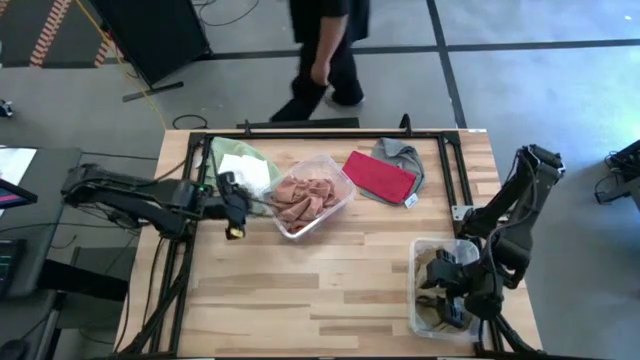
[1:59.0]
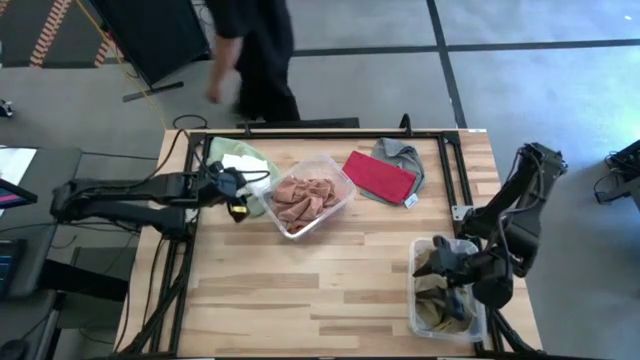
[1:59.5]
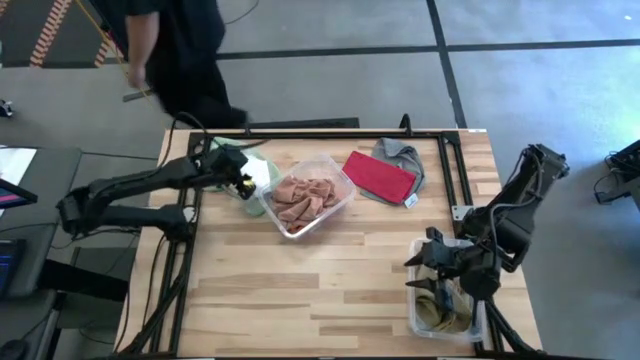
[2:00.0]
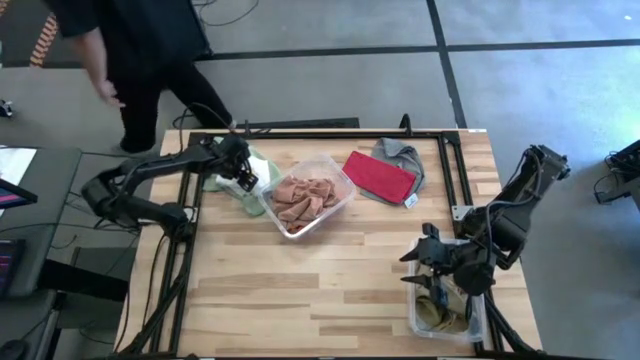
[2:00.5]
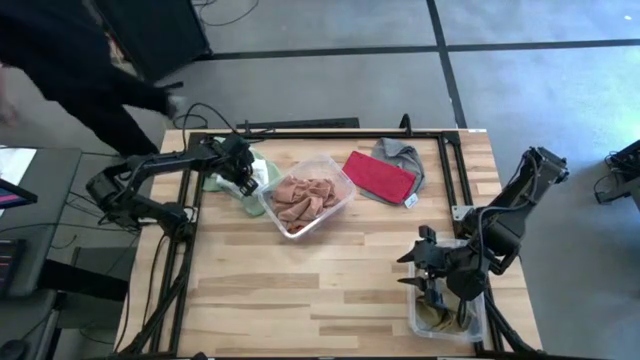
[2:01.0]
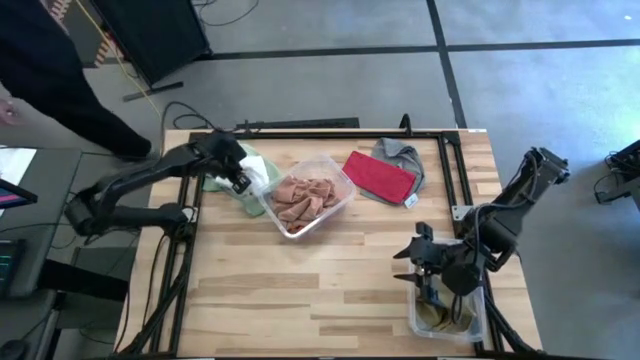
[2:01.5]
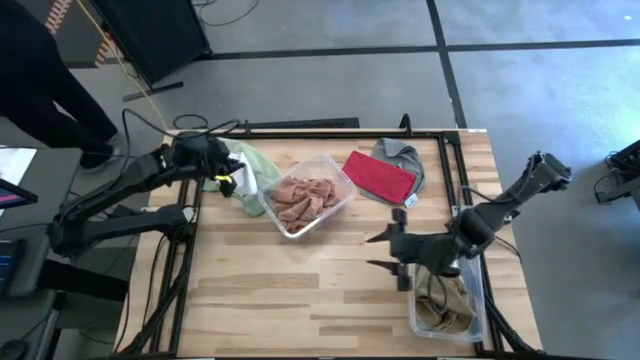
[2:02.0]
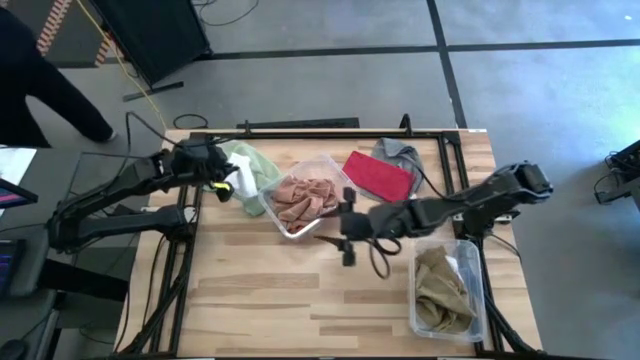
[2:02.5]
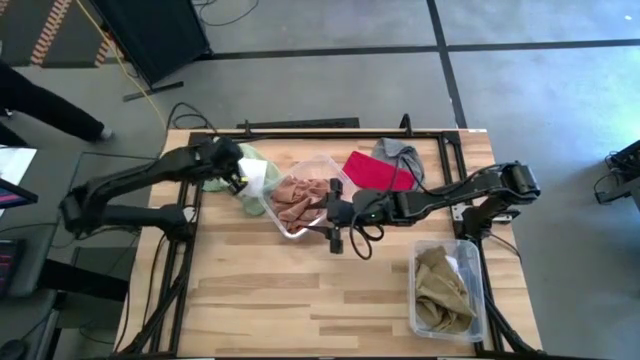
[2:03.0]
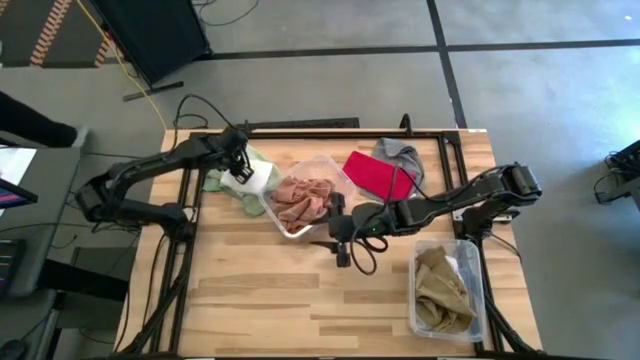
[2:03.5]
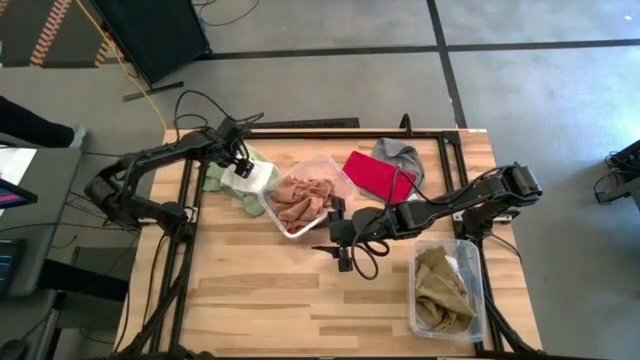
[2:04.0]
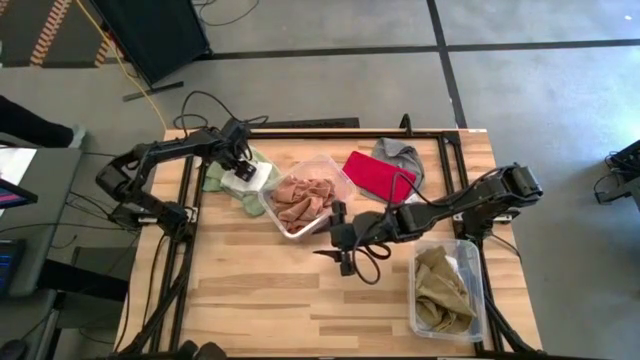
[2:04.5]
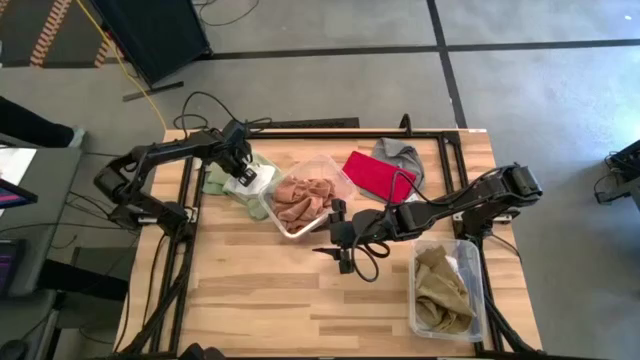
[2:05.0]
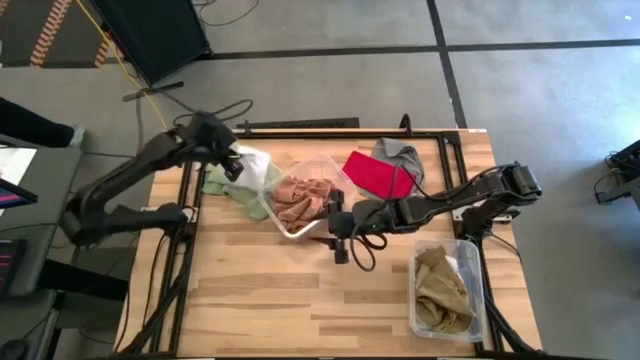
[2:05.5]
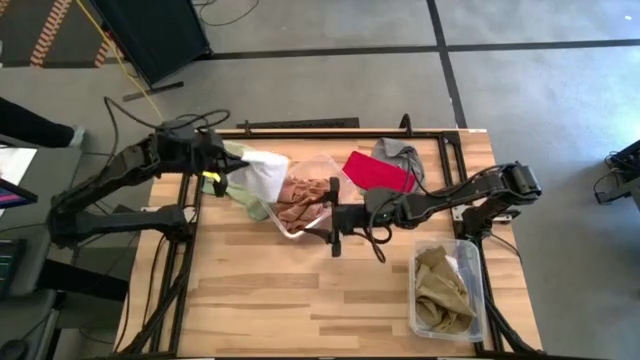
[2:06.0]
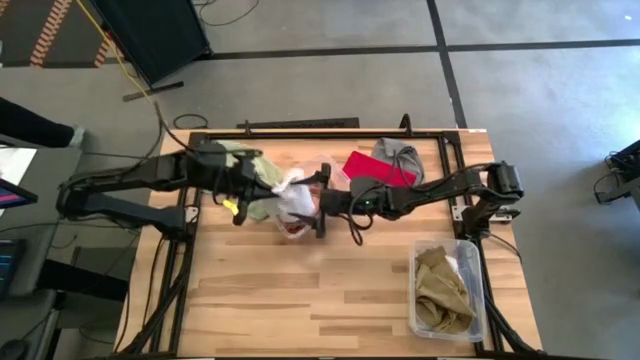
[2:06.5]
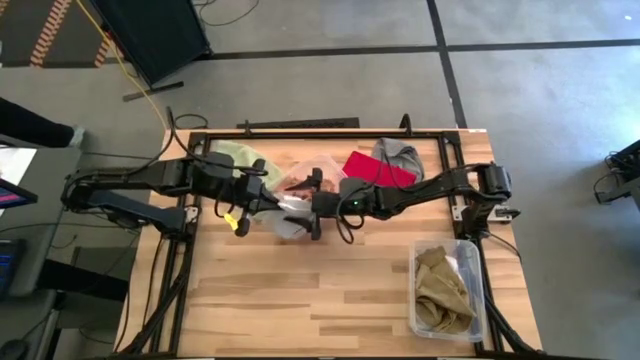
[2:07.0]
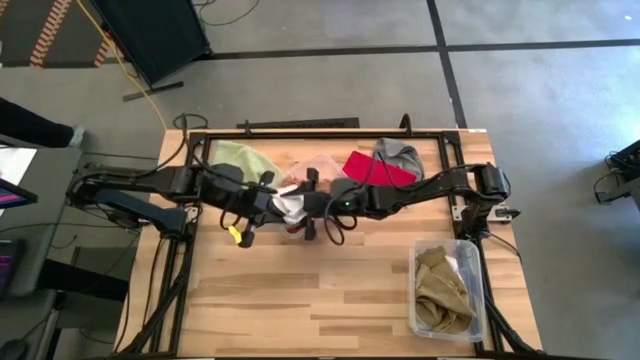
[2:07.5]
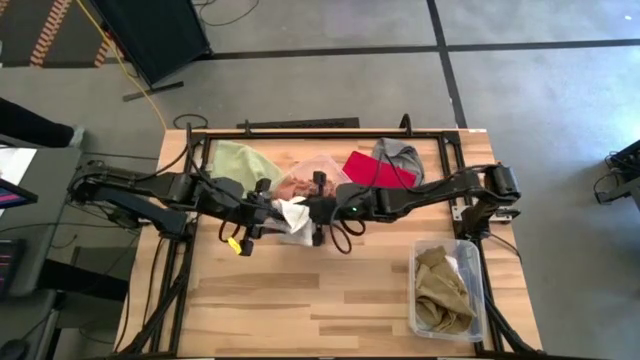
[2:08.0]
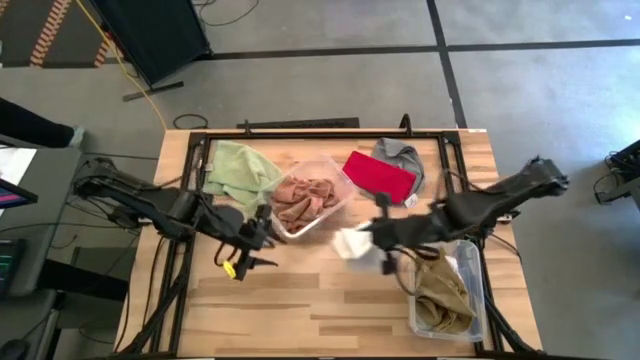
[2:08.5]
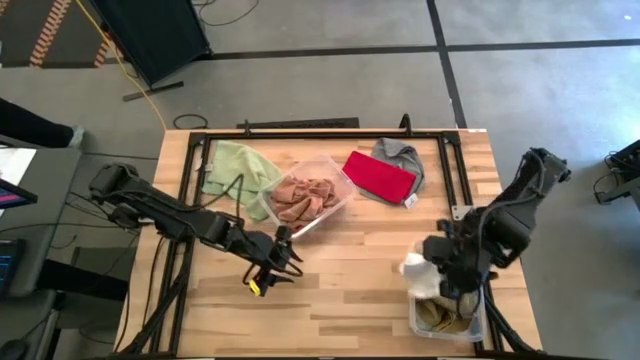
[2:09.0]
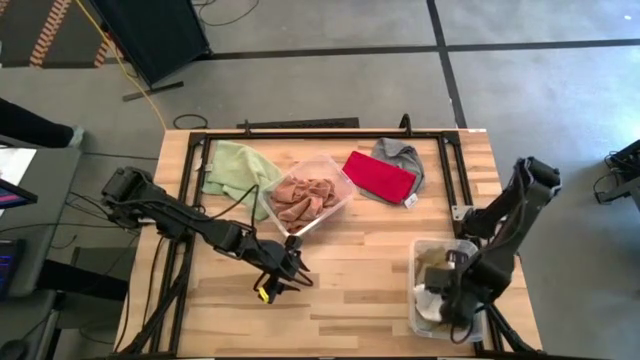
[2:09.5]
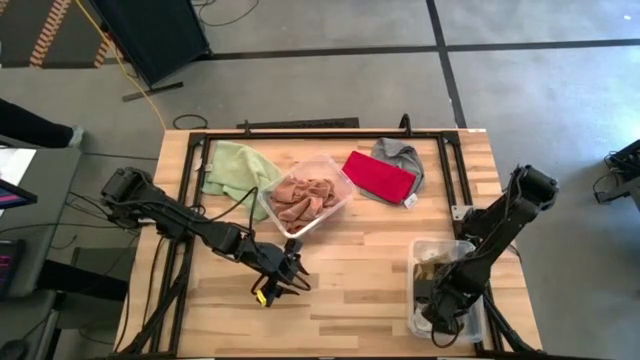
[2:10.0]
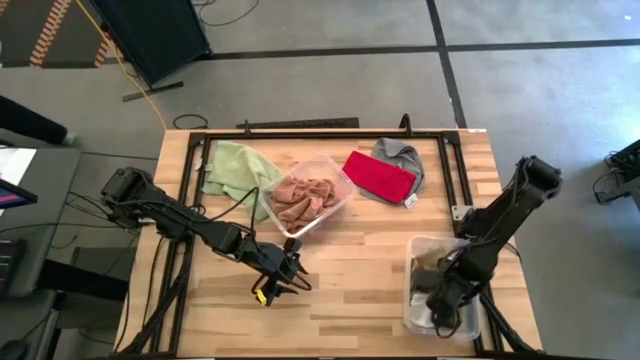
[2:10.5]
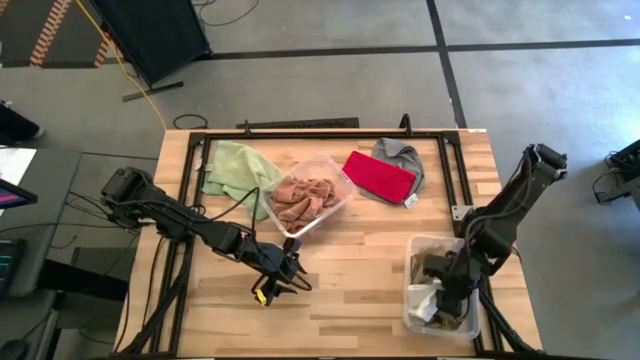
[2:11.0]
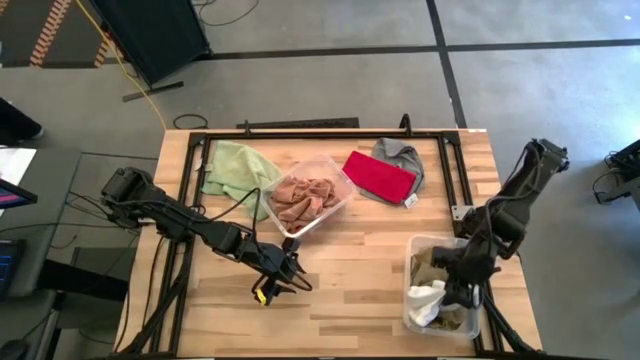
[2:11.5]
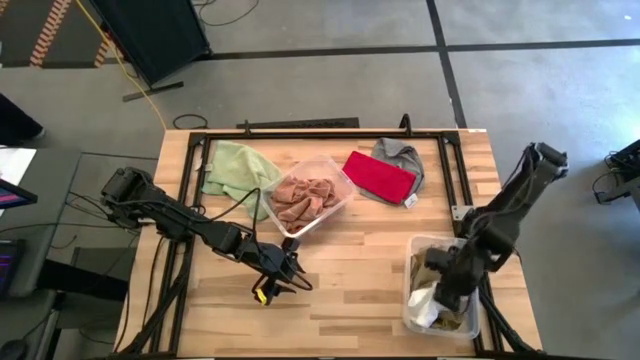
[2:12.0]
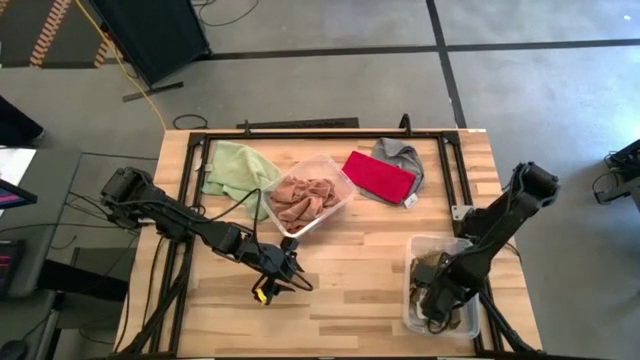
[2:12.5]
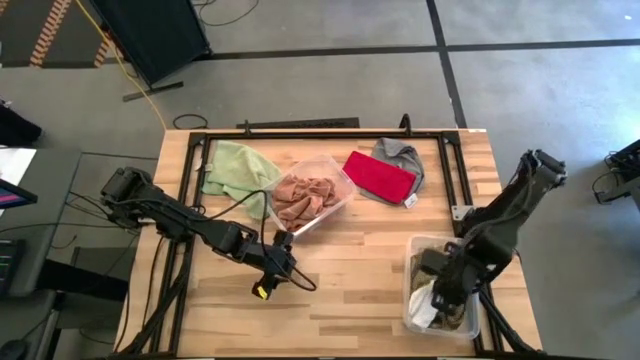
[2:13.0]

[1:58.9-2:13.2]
Task: Sort towels by color in basket
Put the white towel into the bottom transparent bin

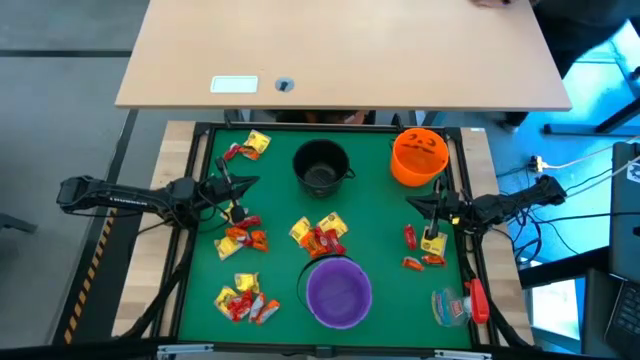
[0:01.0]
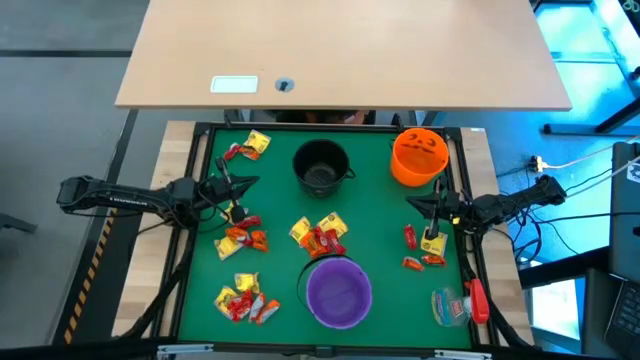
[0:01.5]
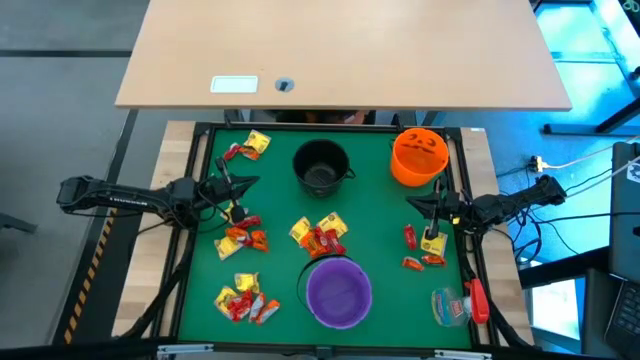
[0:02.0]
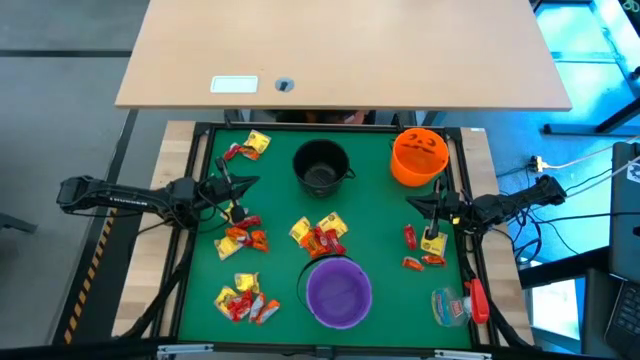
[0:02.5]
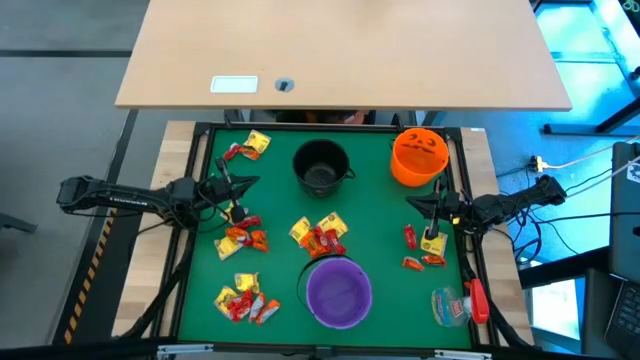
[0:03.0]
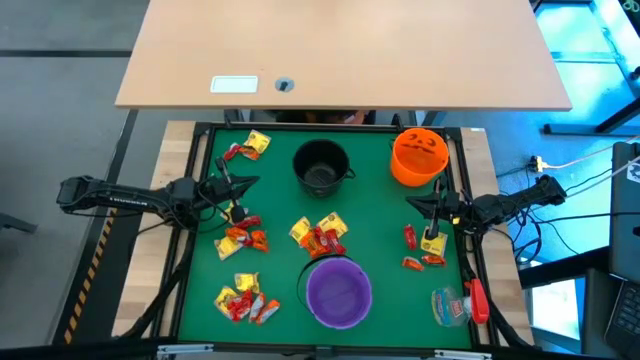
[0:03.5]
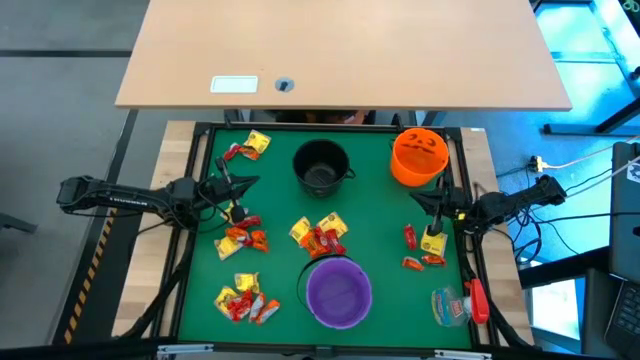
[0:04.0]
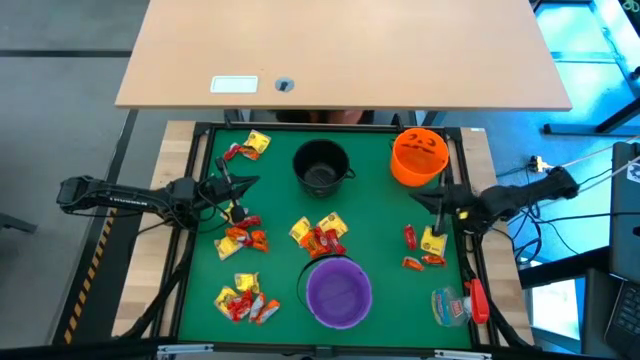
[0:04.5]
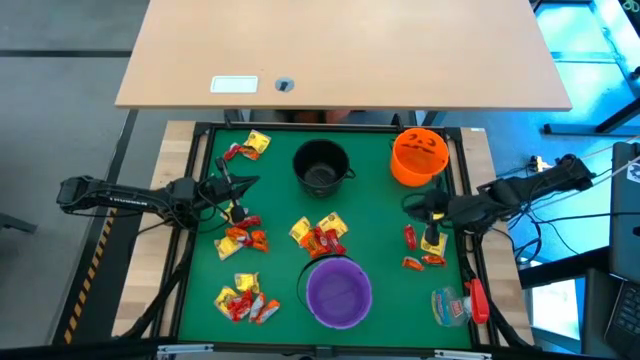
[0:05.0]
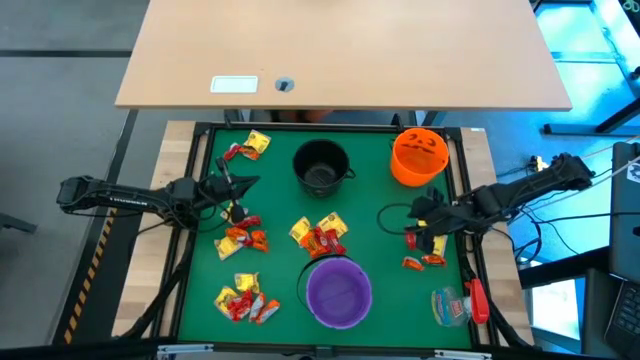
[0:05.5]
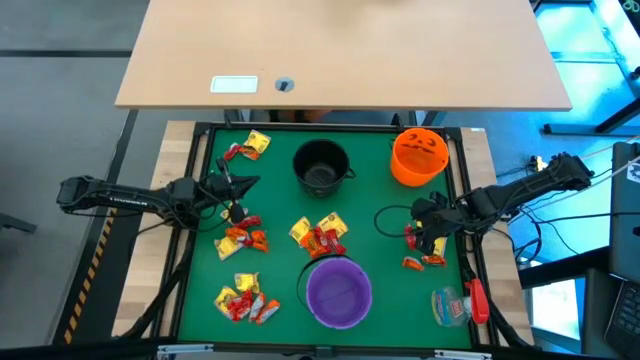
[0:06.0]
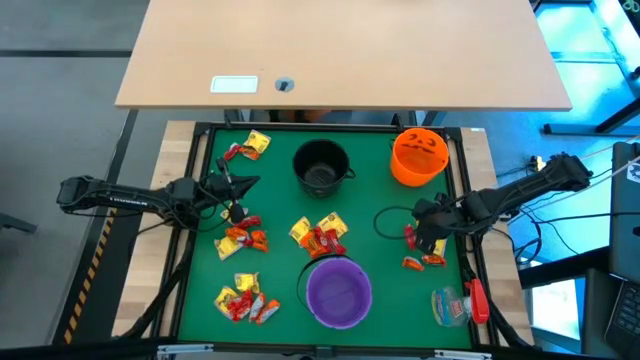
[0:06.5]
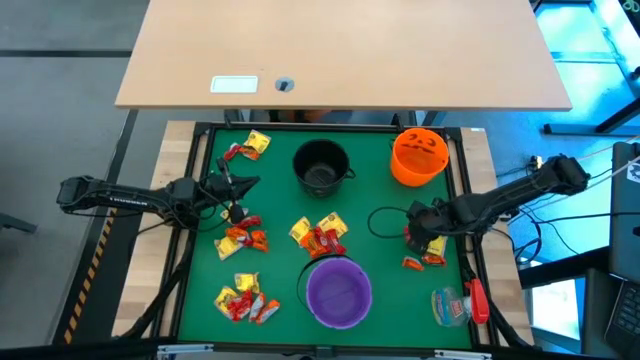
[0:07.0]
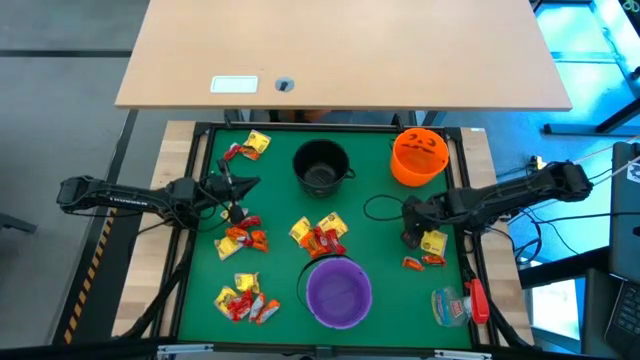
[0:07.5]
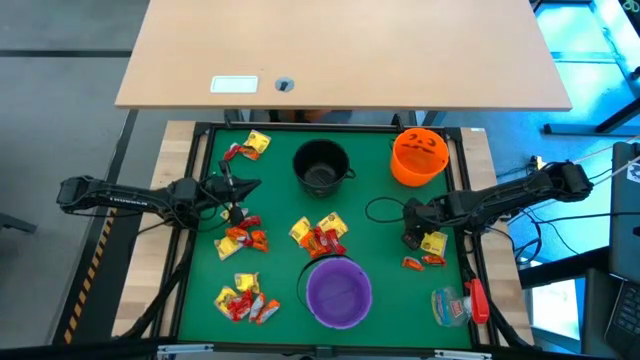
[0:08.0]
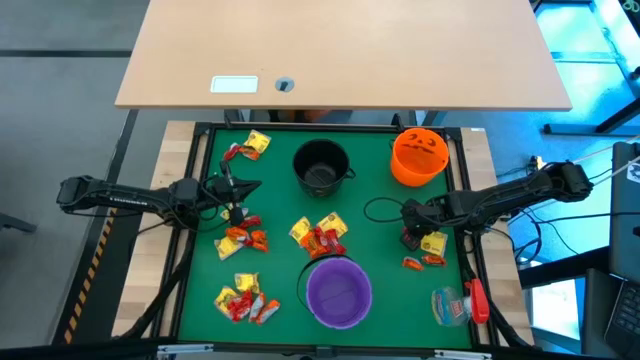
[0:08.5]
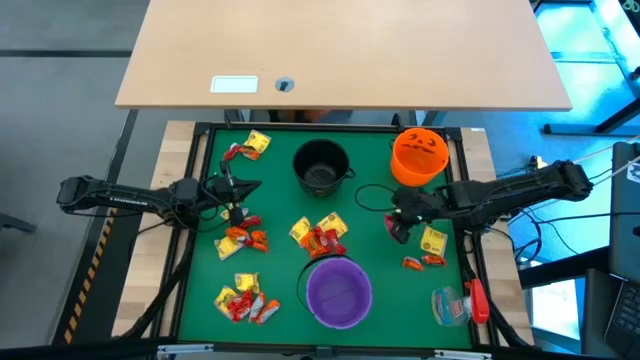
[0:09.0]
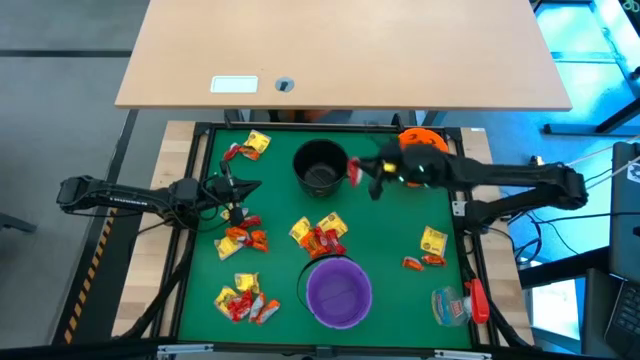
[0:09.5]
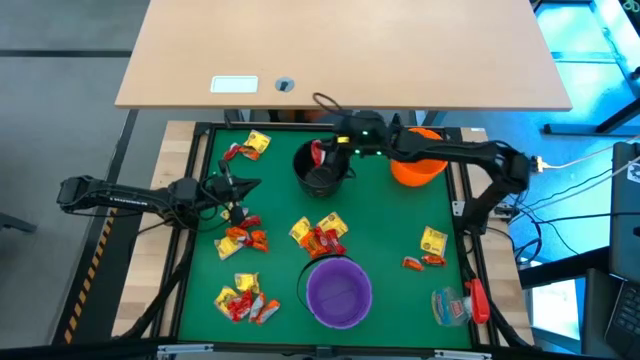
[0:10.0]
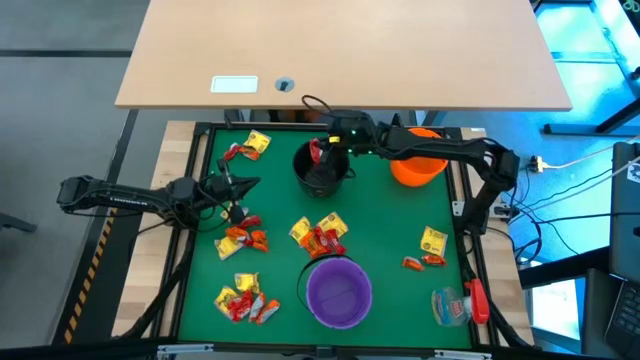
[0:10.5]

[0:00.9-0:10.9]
Task: Sort candy
Put the red candy into the black bucket
